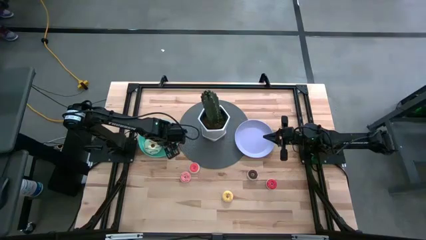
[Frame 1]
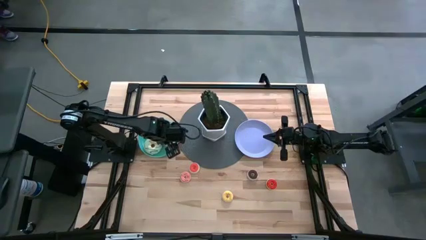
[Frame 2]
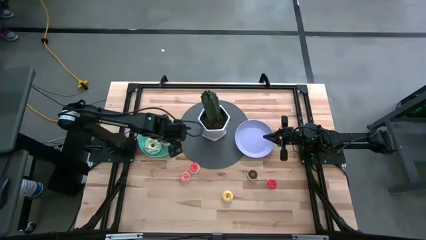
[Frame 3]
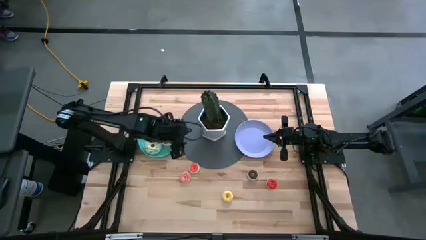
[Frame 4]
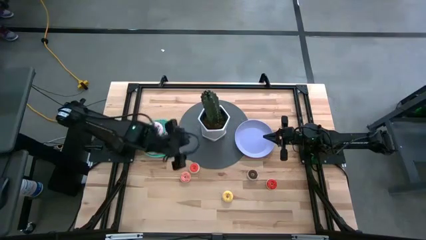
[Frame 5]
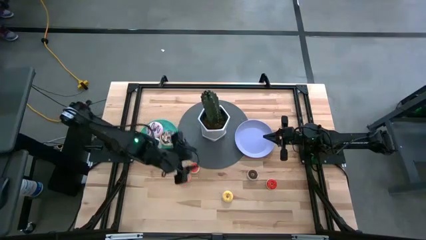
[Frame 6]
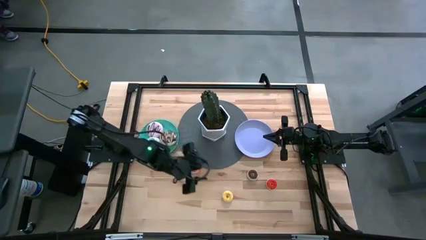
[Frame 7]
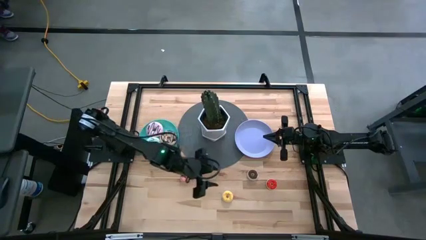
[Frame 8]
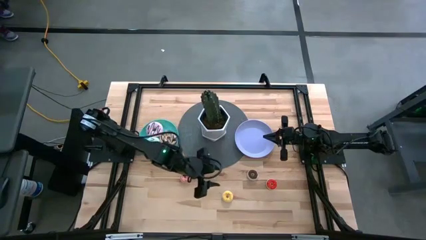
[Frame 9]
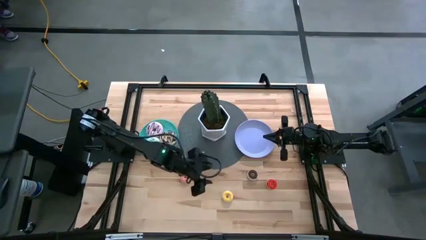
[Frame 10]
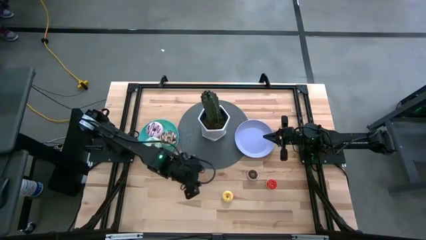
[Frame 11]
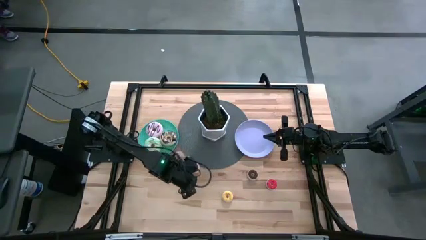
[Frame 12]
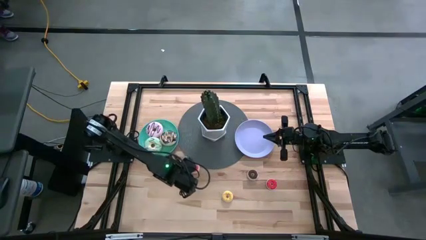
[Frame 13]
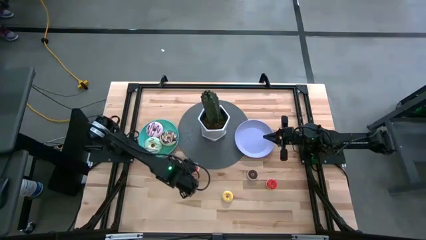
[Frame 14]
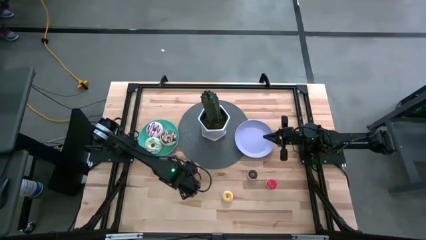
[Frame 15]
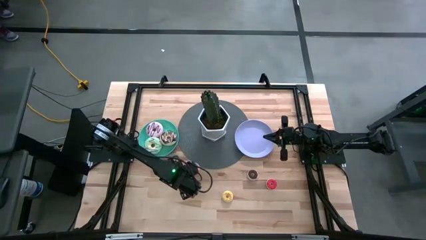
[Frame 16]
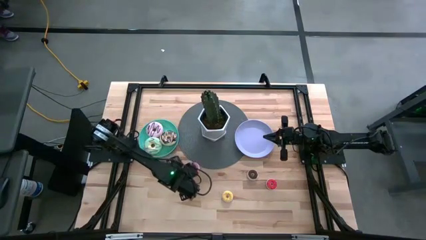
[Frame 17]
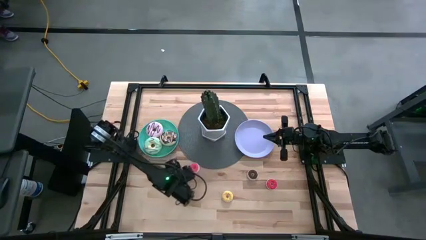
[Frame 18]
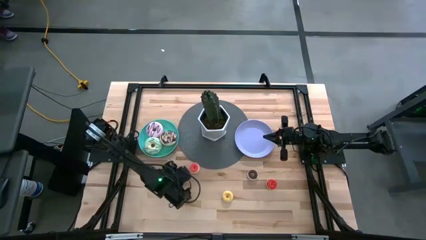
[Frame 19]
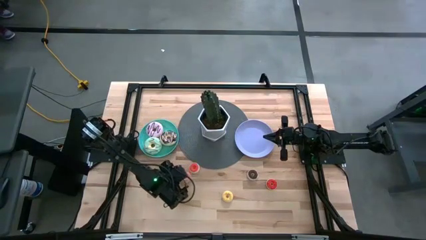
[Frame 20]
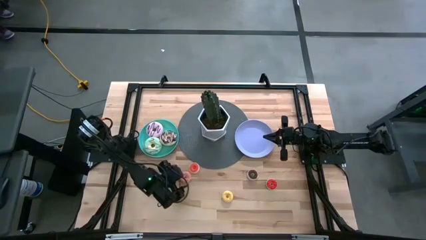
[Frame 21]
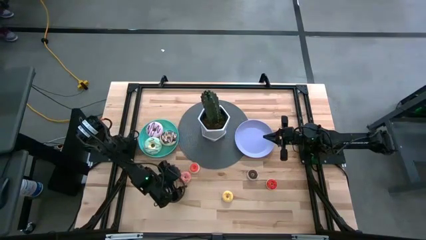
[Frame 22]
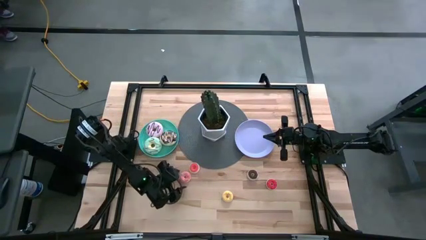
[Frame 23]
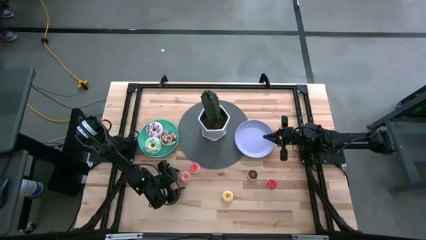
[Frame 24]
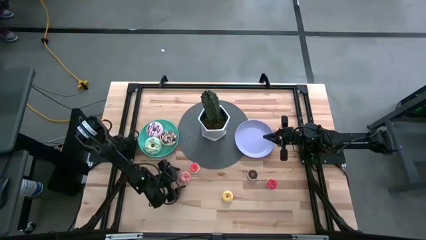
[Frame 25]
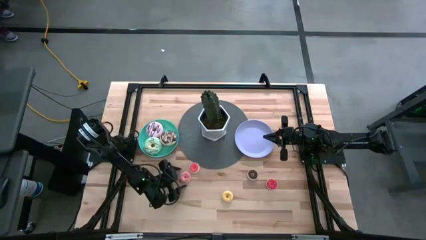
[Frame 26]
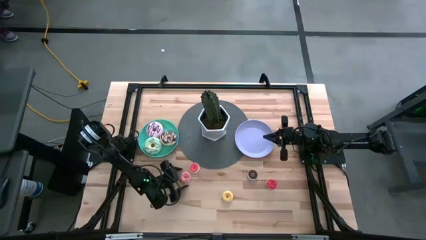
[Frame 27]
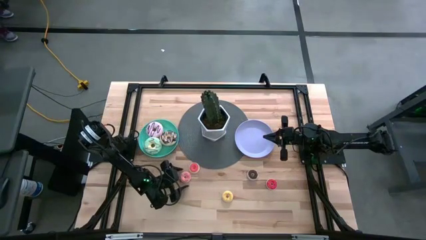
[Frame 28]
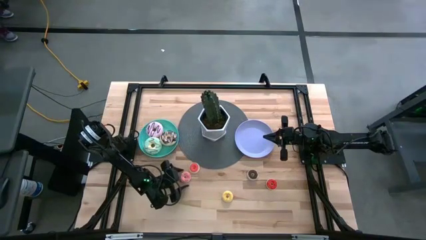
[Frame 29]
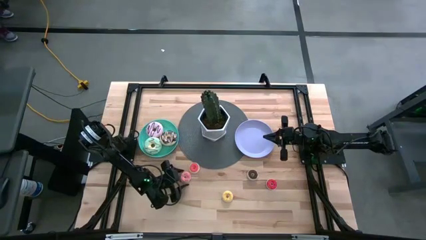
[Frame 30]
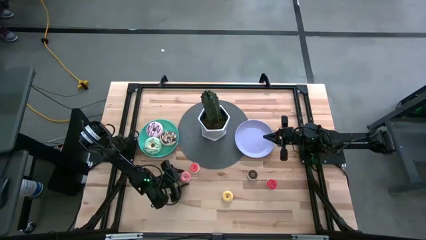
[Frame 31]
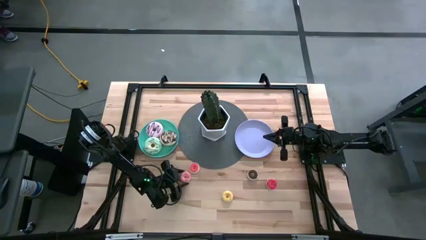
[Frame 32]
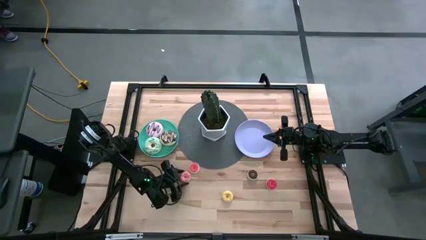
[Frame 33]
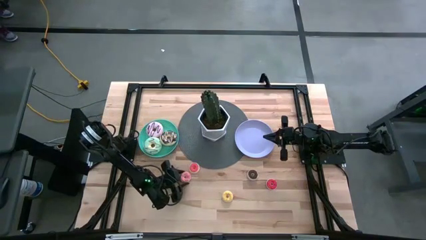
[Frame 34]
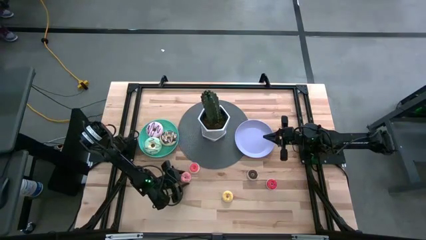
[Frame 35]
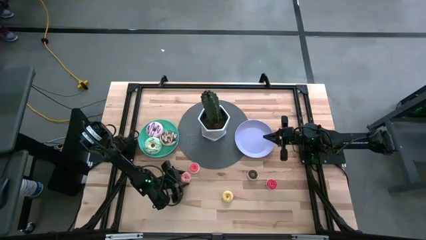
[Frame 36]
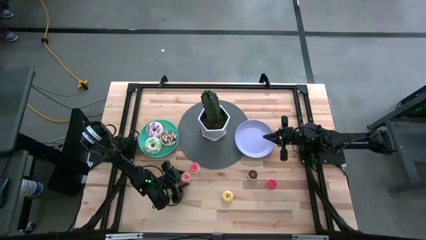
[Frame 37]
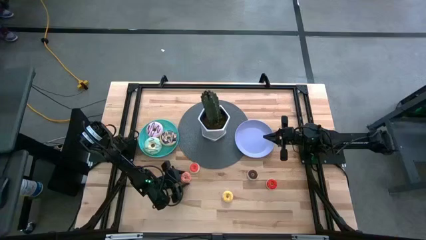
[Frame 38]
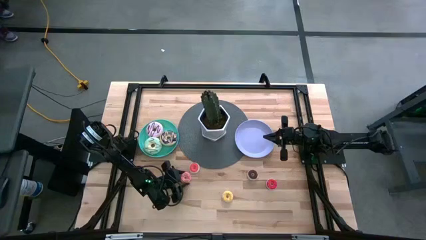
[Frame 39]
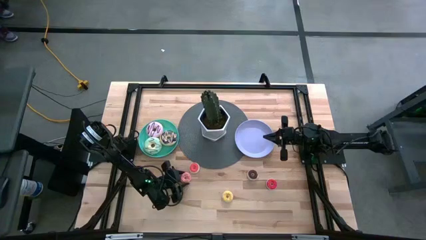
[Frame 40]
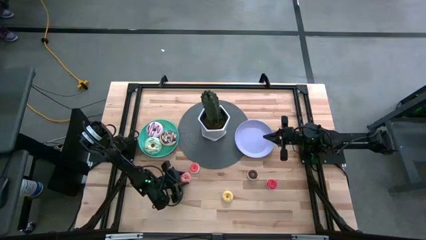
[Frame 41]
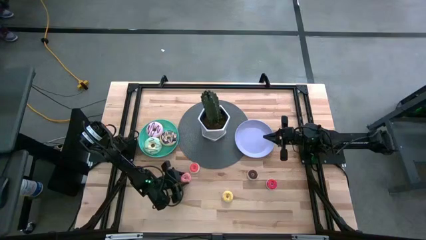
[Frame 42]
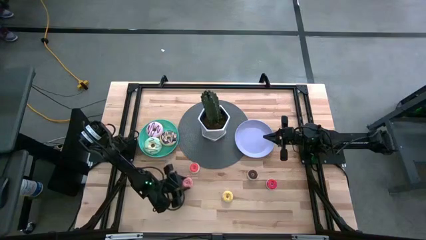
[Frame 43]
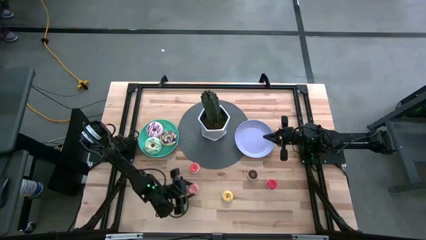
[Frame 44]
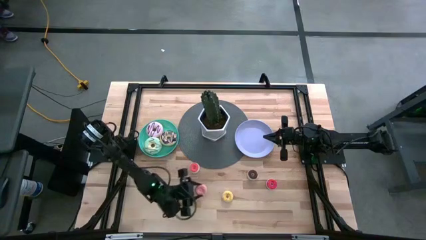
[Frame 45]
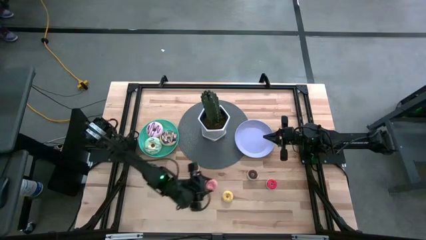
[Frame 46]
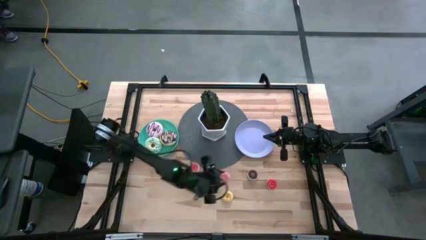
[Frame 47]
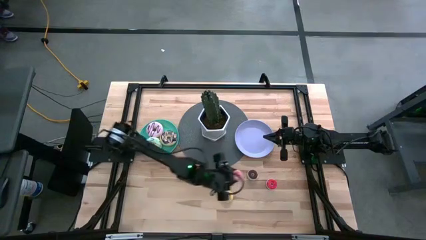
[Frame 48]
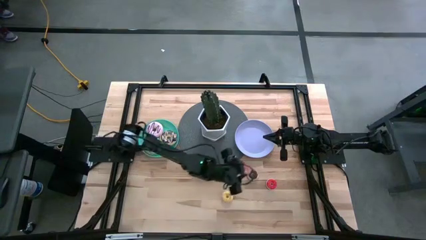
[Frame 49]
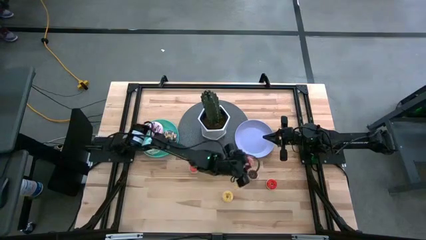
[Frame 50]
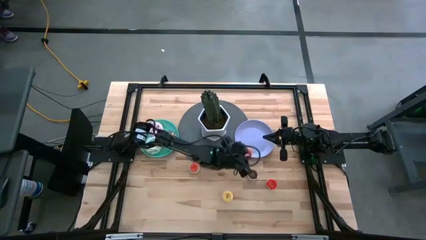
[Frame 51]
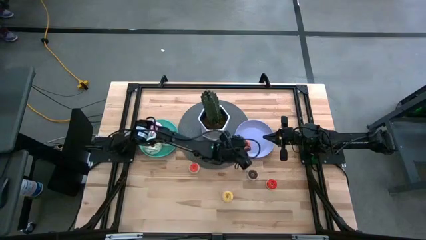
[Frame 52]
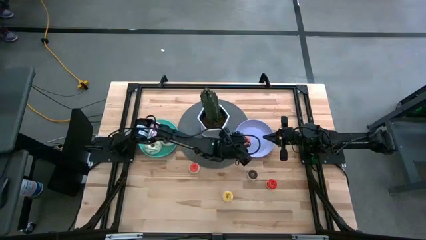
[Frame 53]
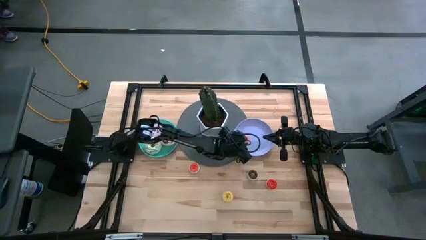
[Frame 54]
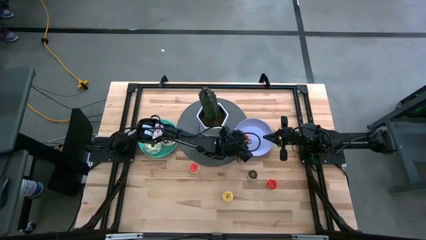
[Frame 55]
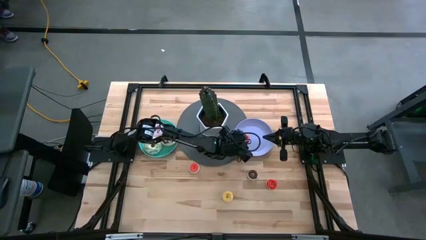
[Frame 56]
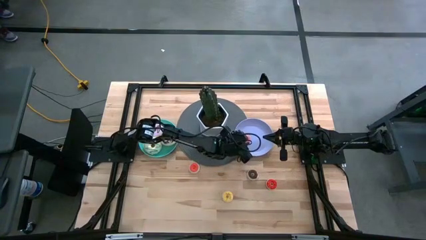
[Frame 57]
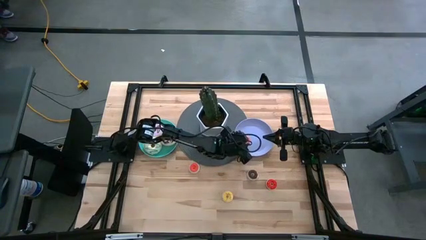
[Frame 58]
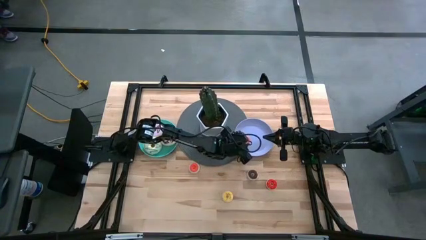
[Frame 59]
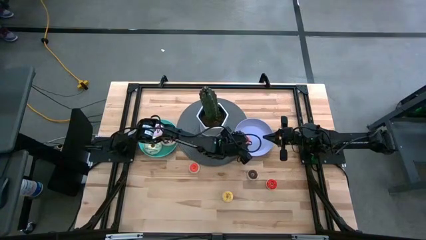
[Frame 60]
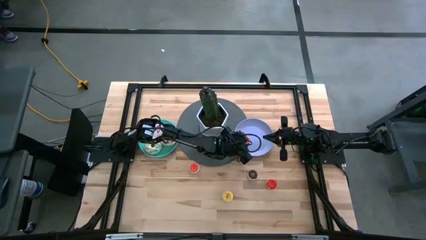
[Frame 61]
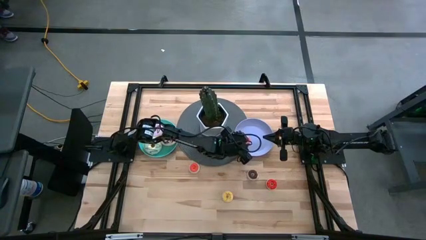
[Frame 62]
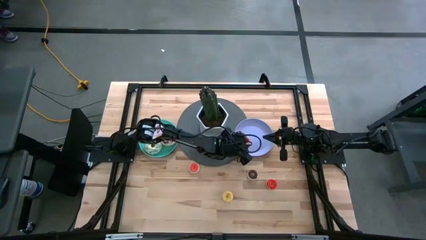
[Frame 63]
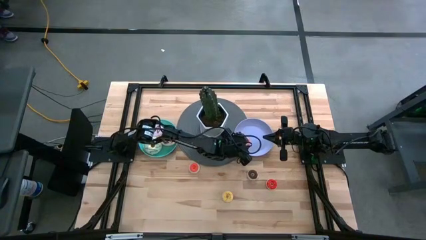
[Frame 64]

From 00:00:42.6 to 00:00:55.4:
Task: Pick & Place donuts
Put the small pink donut on the purple plate
